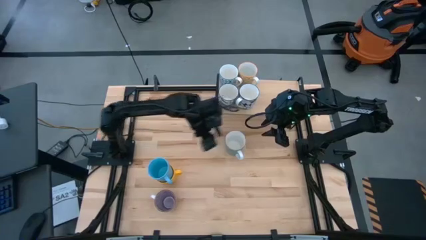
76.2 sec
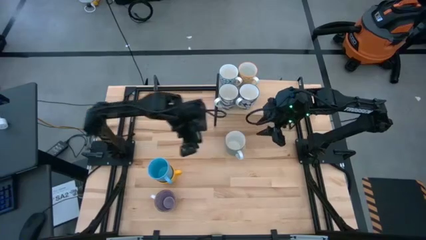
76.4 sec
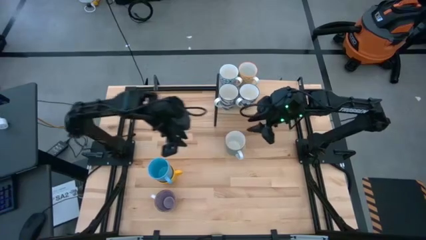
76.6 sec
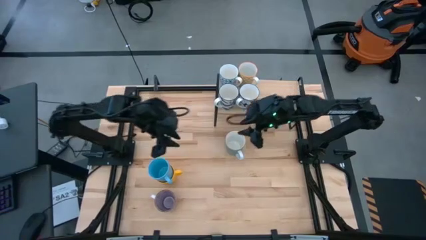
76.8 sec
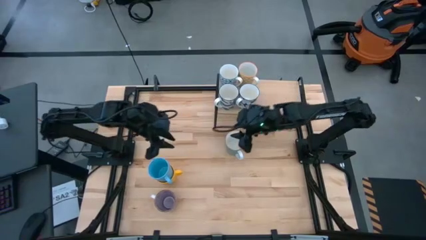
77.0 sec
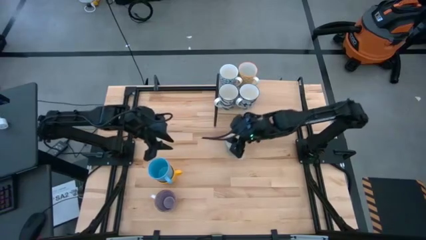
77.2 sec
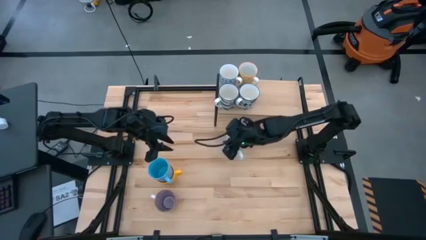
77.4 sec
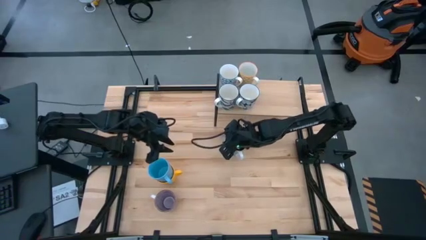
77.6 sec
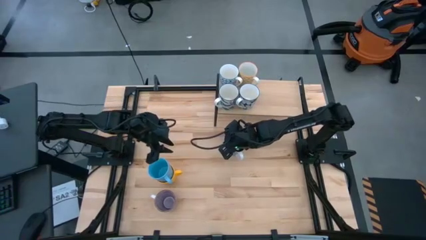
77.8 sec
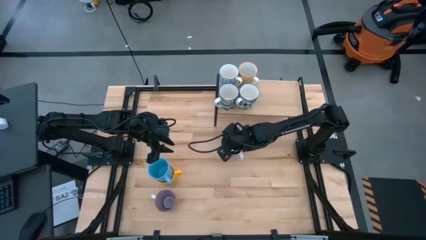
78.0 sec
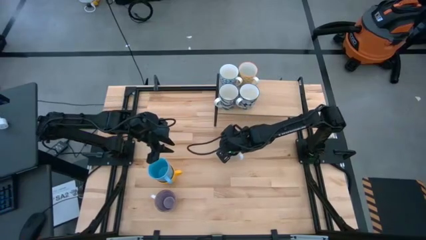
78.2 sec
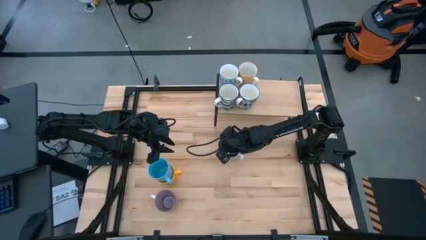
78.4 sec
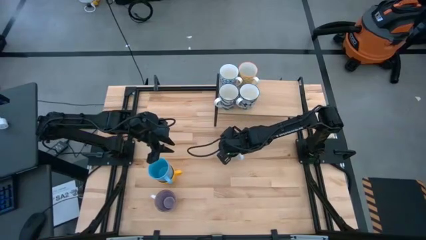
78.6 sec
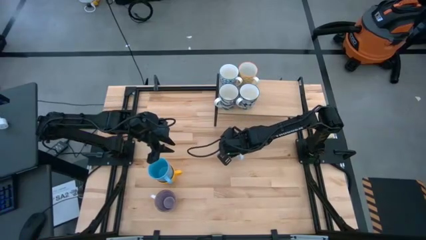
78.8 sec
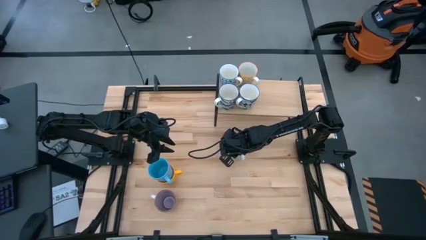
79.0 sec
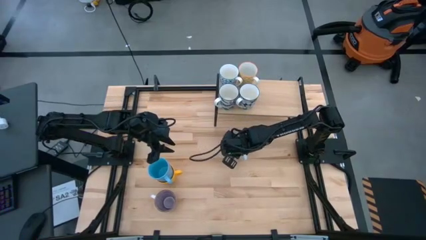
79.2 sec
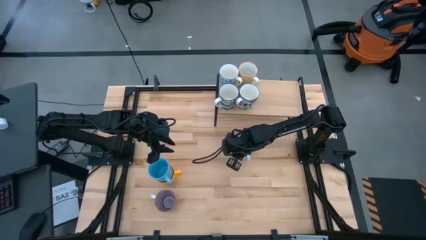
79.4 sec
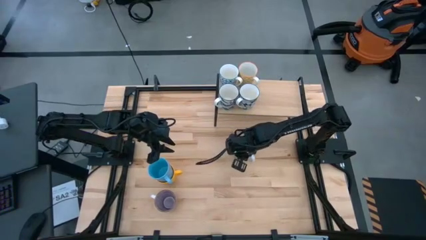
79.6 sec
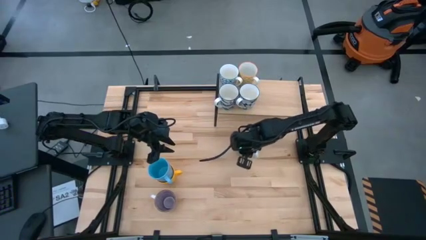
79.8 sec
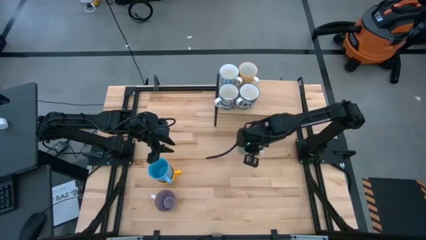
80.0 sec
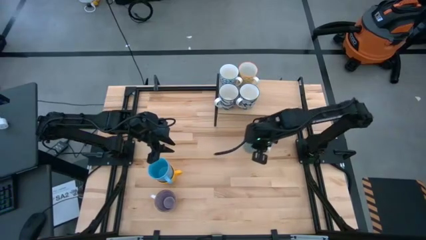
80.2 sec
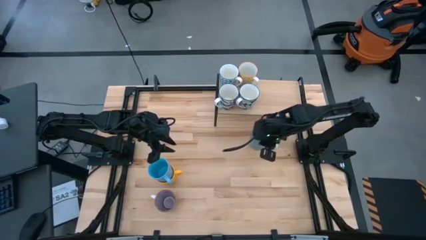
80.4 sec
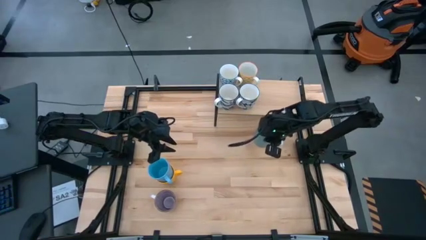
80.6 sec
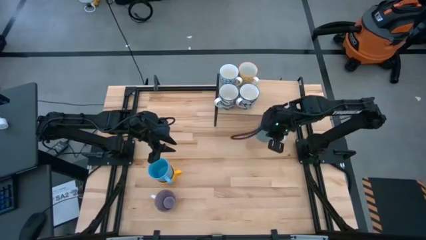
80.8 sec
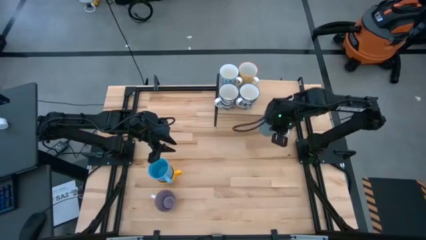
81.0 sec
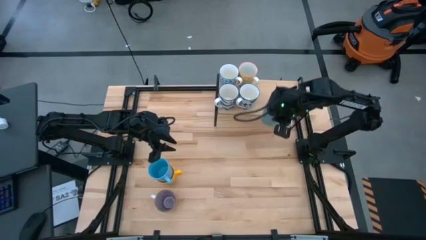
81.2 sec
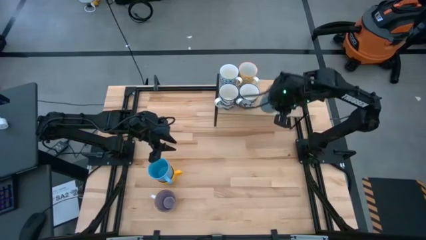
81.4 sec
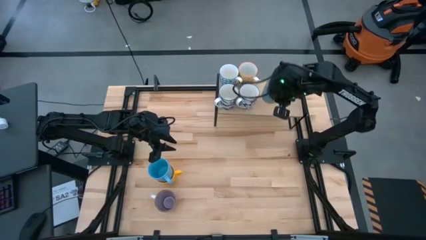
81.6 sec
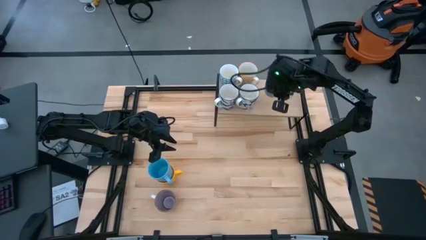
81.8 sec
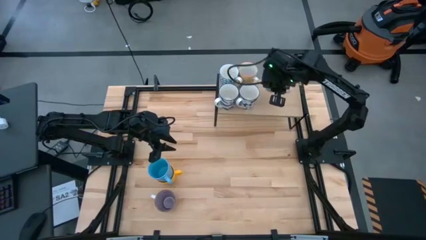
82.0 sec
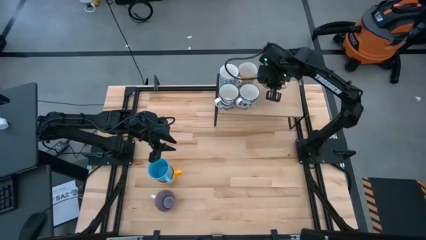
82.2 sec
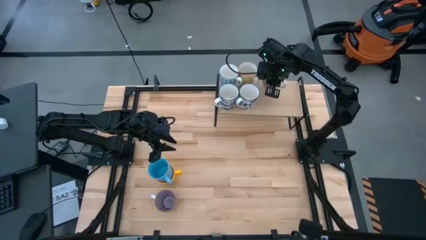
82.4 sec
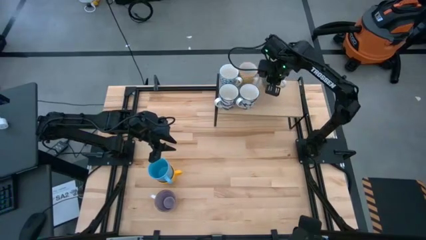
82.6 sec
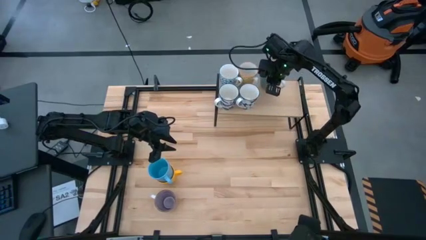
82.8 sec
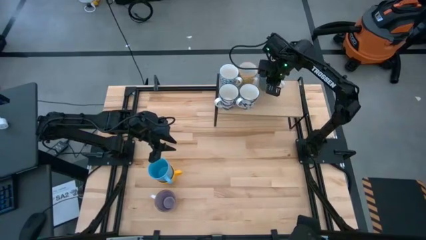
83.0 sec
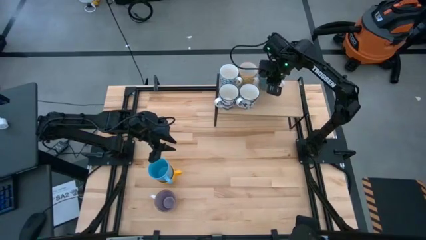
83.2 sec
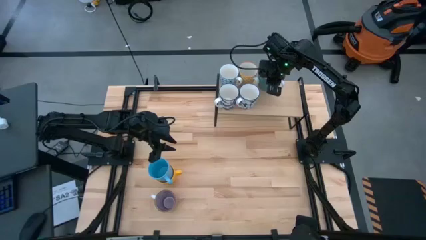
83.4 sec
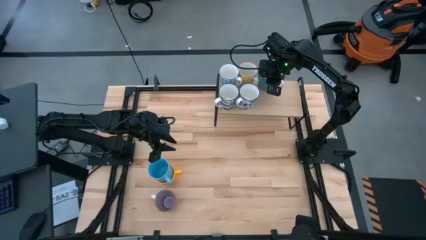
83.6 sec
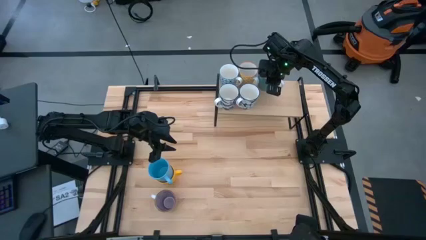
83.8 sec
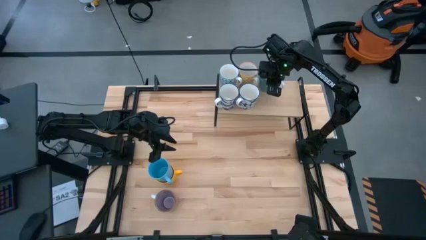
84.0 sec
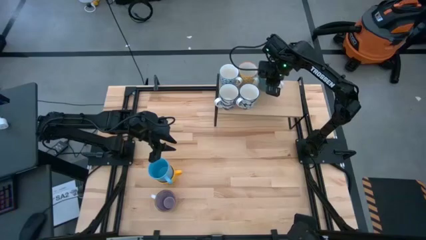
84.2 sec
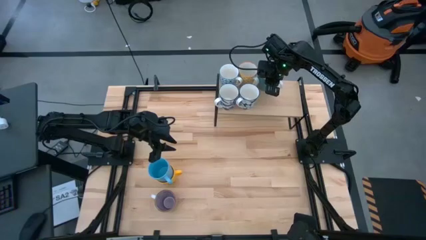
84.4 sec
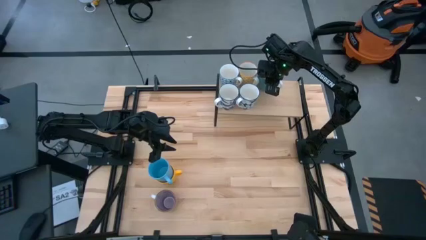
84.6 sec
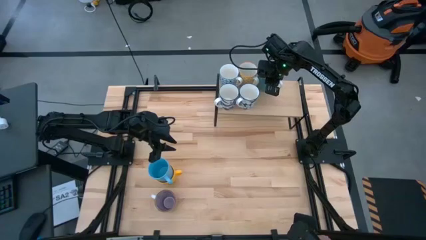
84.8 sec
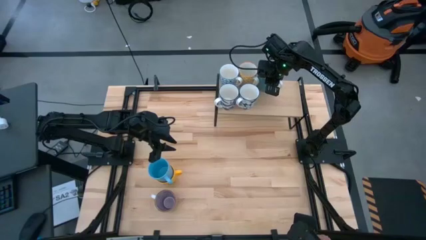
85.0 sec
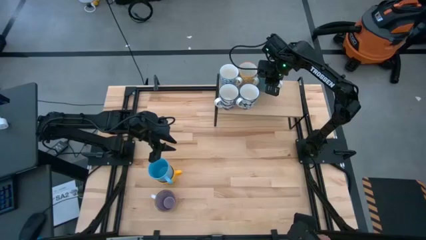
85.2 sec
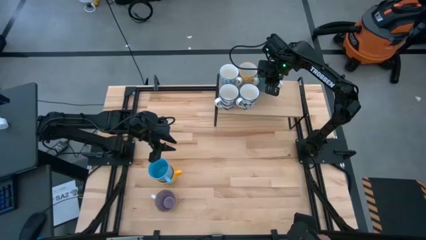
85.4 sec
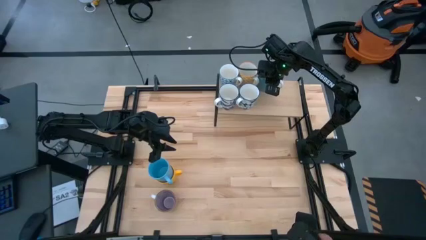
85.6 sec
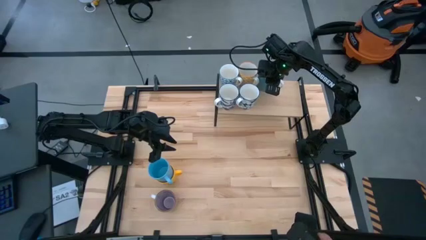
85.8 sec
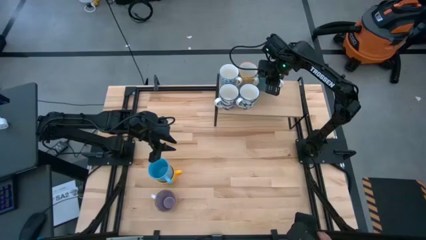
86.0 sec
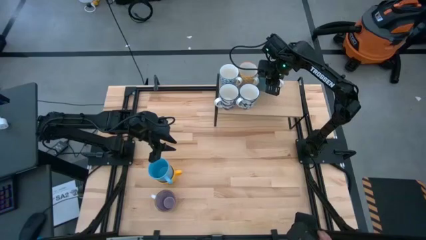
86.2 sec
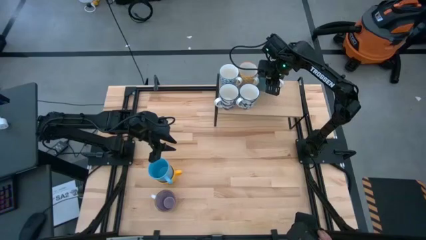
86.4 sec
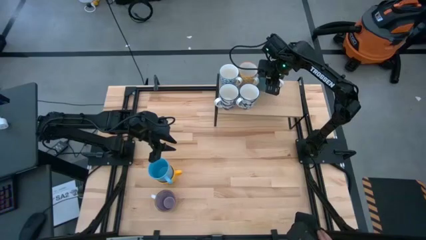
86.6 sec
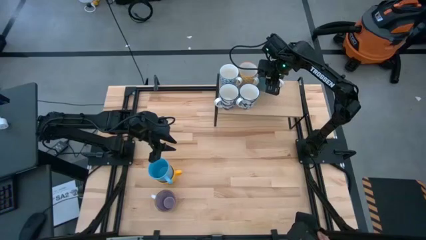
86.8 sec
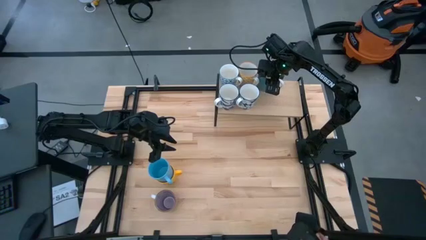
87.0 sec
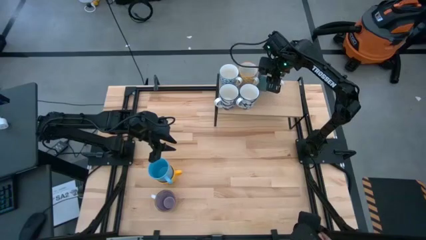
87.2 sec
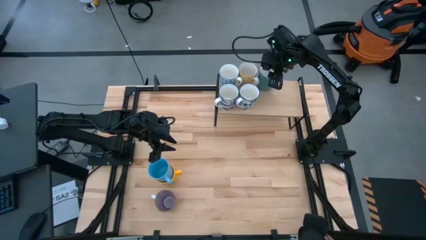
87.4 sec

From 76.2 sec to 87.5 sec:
Task: Place coffee mugs
Put the blue mug on the shelf

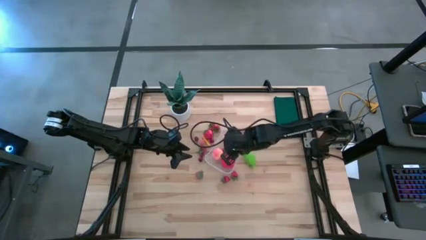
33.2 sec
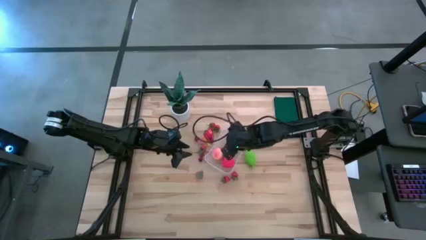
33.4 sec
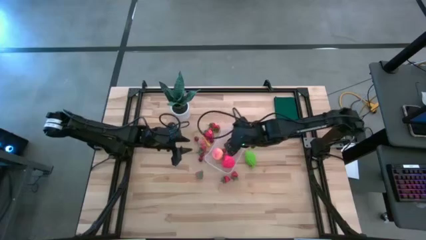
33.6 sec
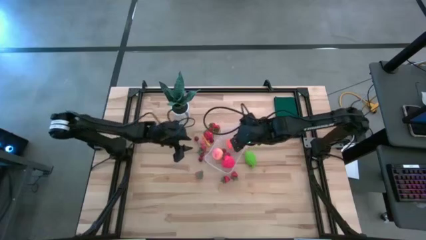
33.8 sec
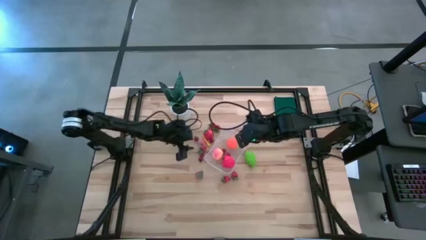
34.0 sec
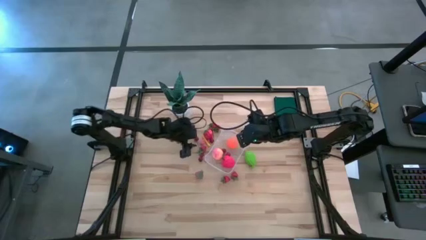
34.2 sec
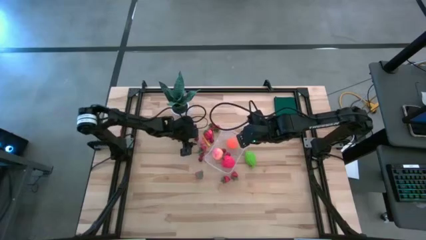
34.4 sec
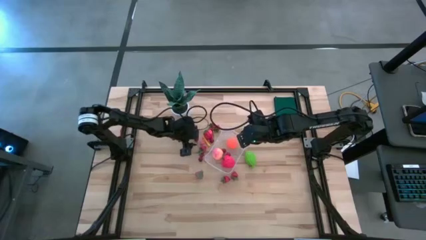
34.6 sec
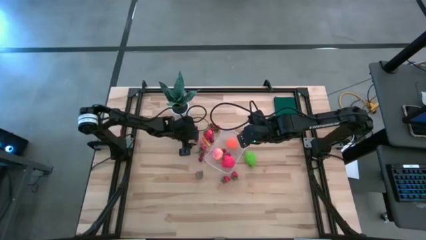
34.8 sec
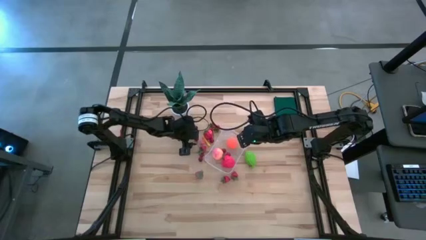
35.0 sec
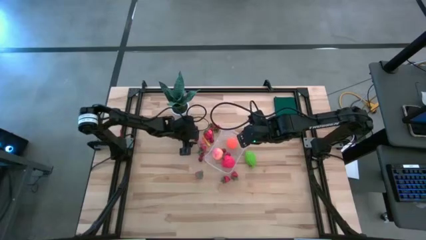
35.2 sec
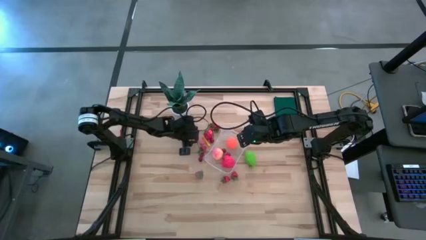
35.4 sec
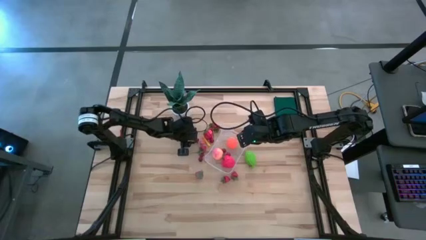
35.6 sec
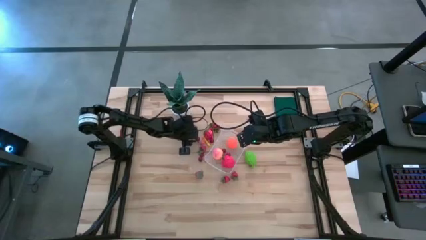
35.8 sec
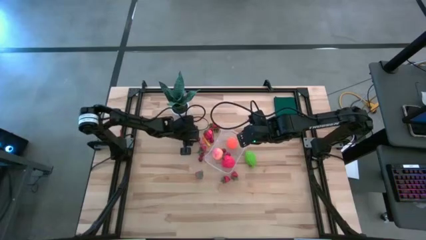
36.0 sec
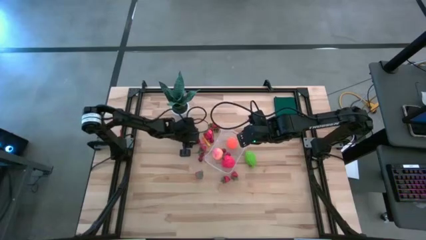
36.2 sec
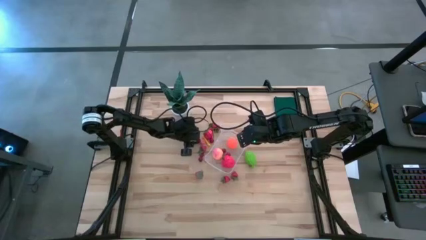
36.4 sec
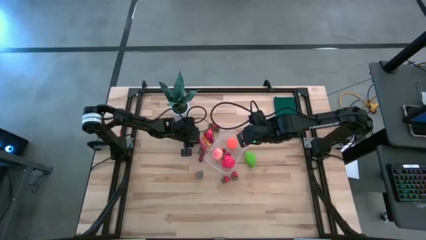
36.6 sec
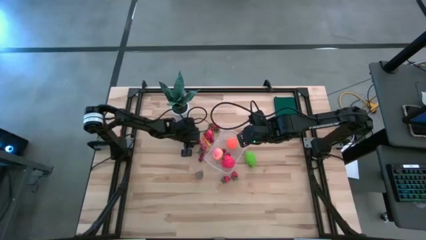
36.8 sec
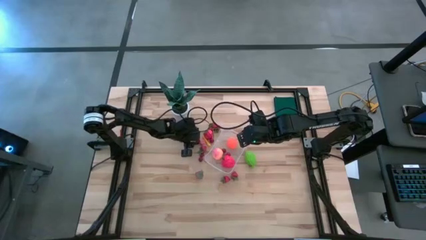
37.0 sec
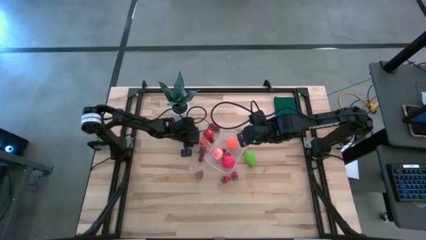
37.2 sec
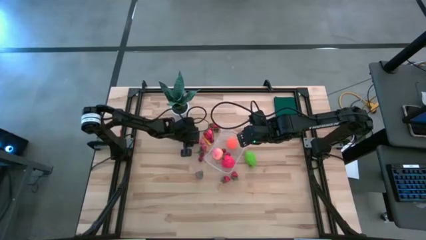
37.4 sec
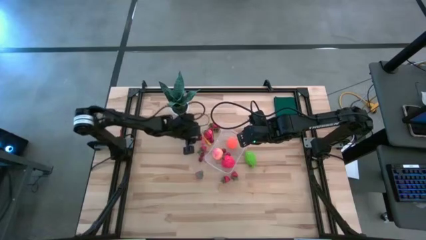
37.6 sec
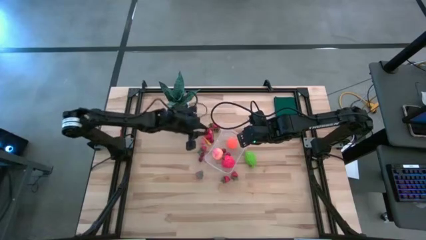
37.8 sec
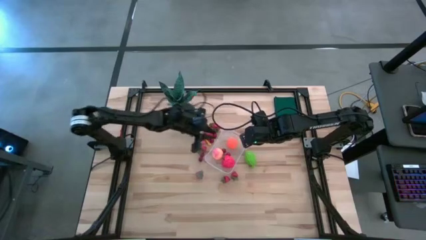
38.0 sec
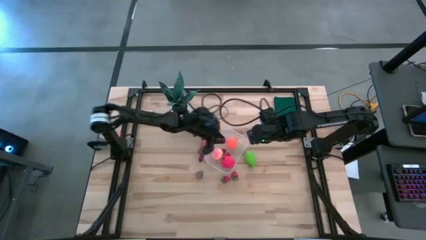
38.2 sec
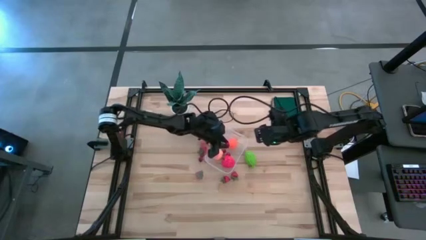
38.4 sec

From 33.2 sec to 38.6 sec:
Task: Pick and placing Produce into tupperware
Put the red cherry into the container
